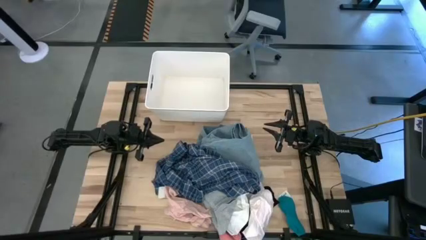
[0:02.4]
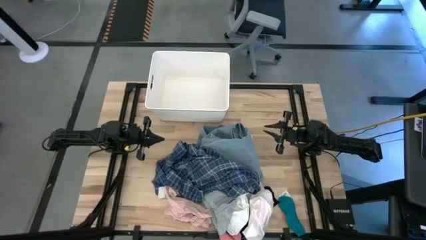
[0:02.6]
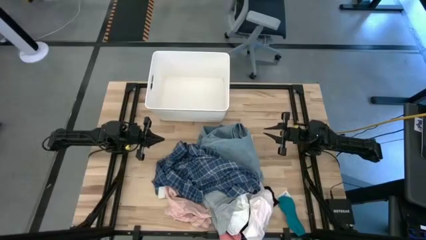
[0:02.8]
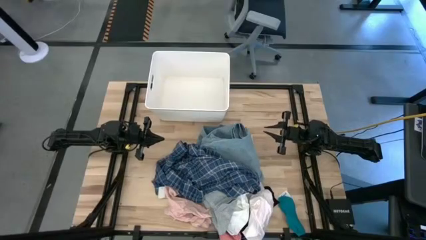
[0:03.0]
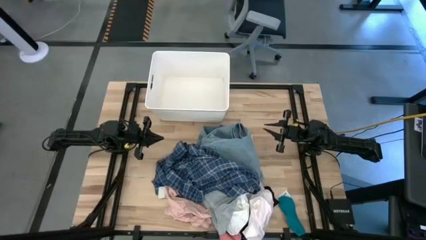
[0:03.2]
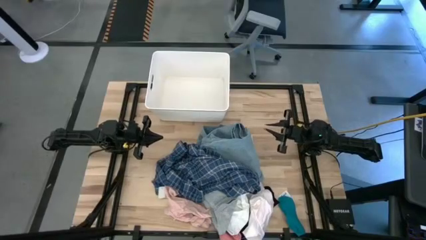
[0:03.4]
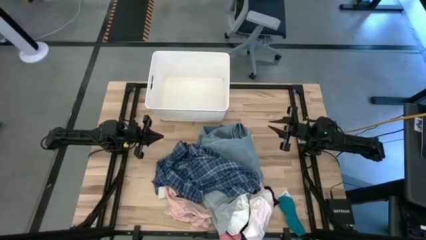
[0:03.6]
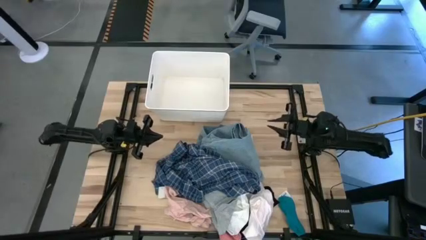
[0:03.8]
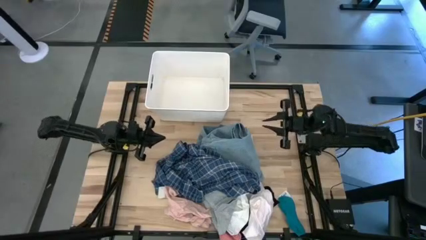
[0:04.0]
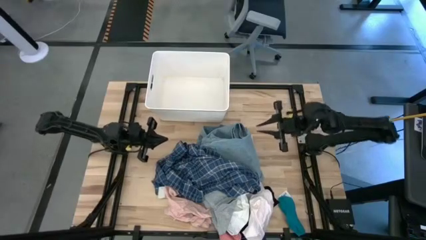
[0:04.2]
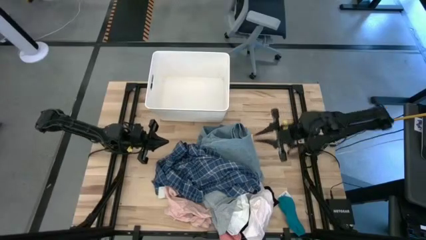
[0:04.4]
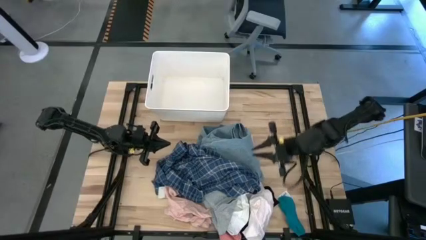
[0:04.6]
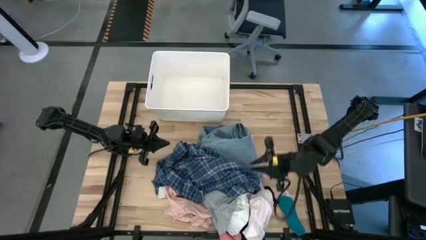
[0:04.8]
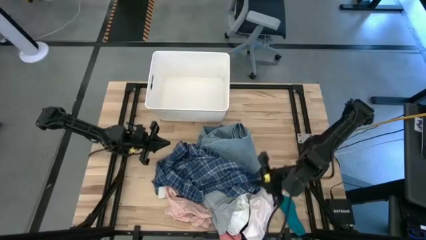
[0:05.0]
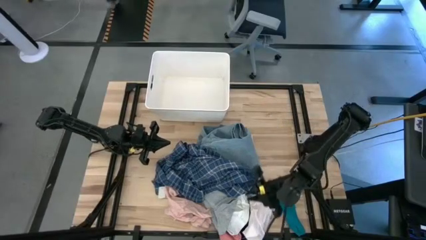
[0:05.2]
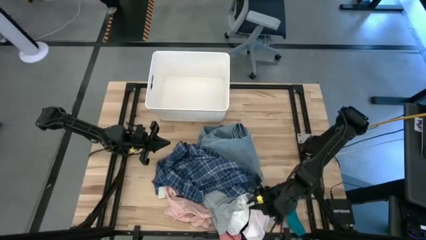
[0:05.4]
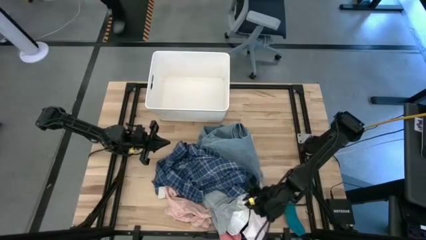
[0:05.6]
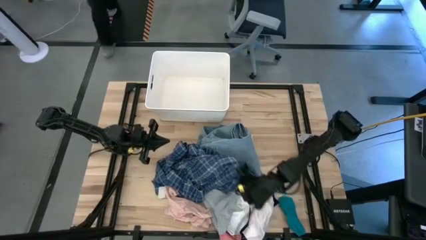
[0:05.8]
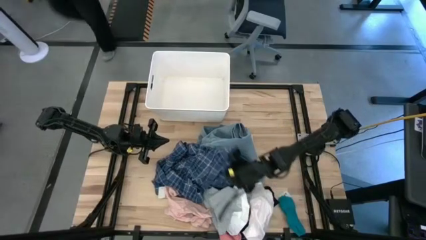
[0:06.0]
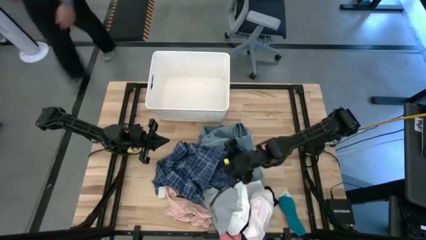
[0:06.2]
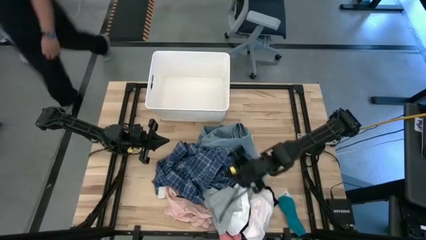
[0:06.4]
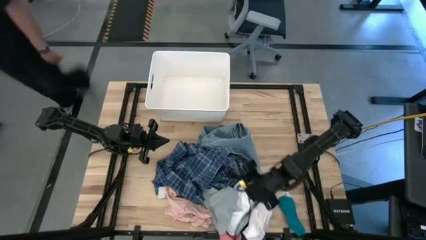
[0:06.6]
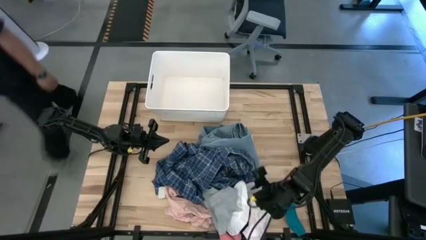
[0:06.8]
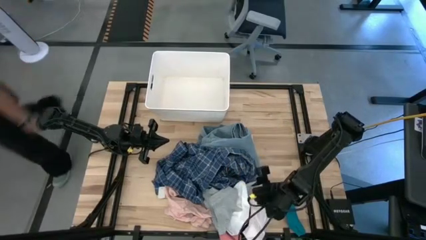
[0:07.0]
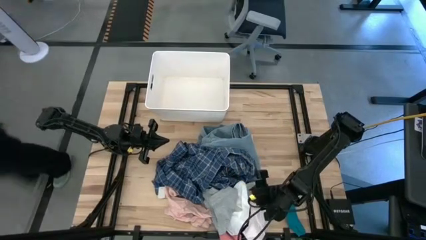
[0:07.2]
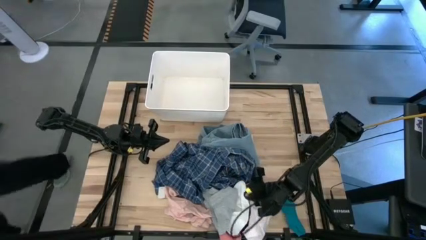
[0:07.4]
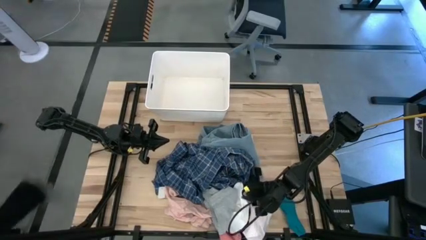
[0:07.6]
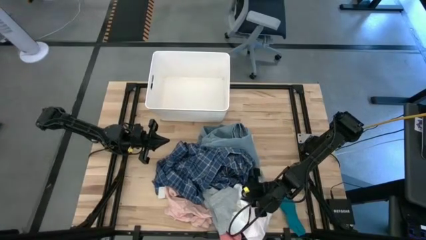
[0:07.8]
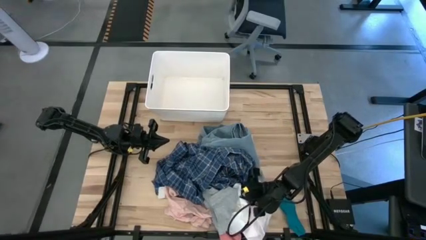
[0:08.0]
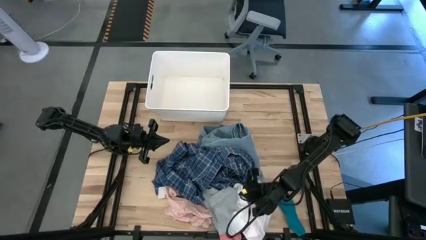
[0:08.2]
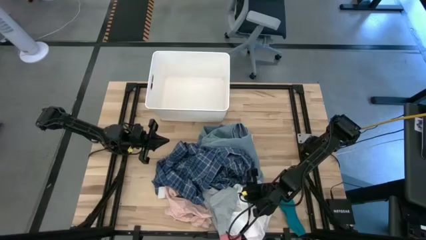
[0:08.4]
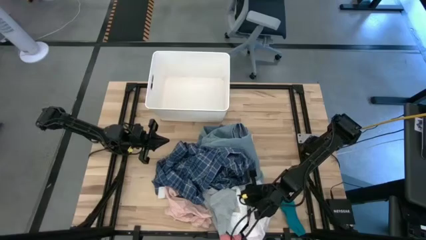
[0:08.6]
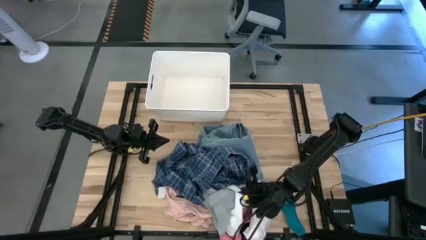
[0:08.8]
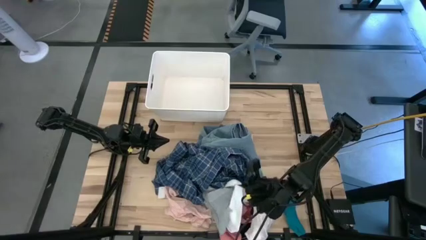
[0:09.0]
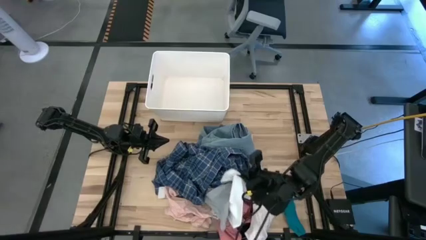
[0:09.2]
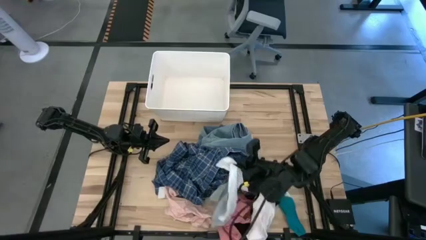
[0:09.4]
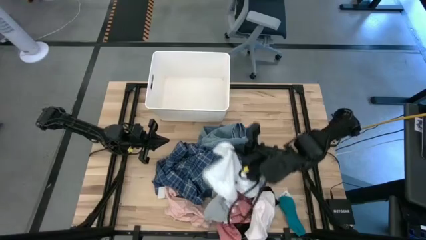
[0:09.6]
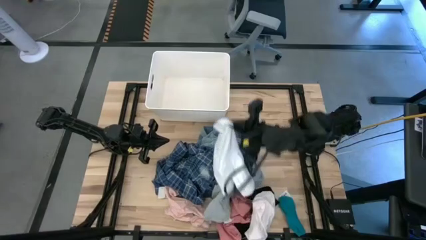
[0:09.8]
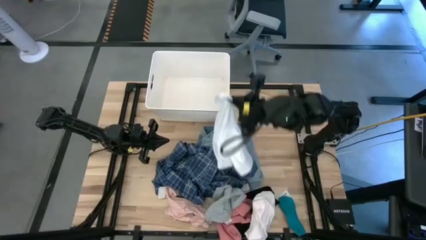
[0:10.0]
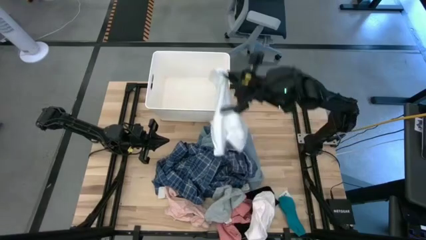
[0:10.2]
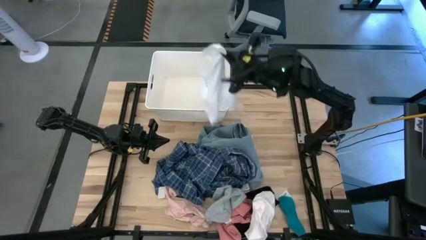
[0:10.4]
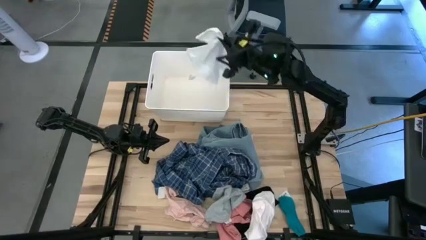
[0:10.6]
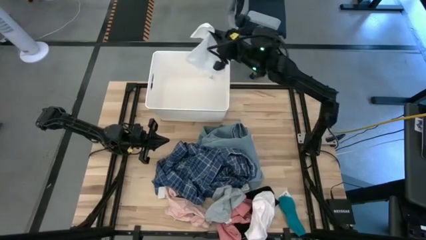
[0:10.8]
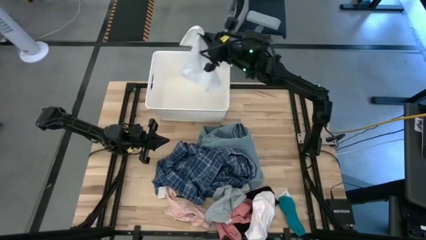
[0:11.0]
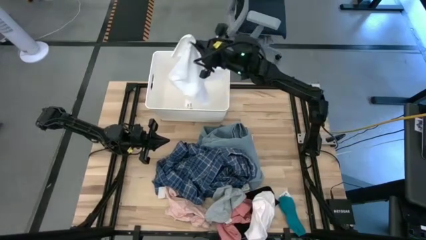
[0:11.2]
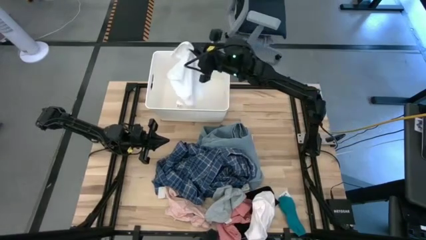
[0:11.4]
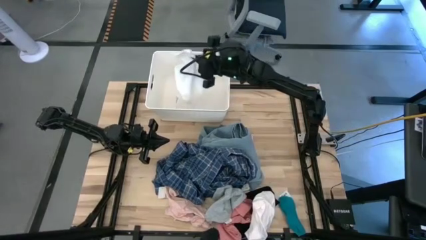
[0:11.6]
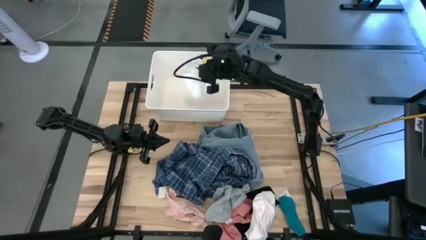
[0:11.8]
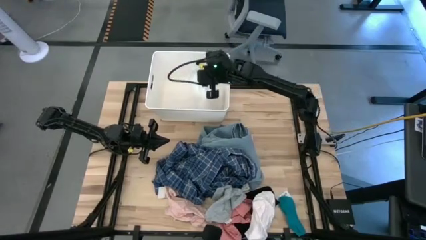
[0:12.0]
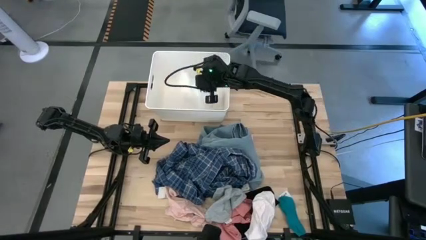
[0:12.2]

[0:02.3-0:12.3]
Task: Sort clothes
Put the white underwear into the white bin

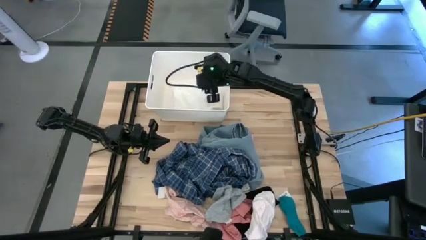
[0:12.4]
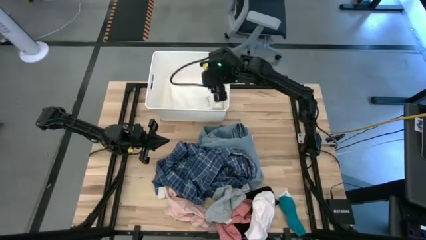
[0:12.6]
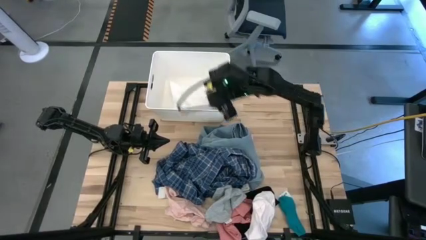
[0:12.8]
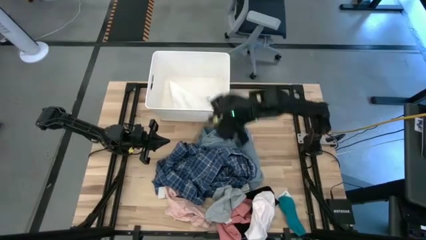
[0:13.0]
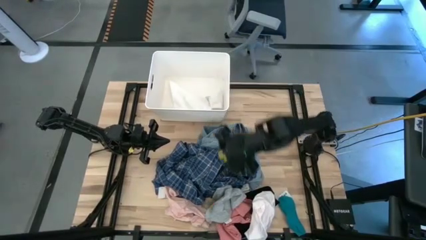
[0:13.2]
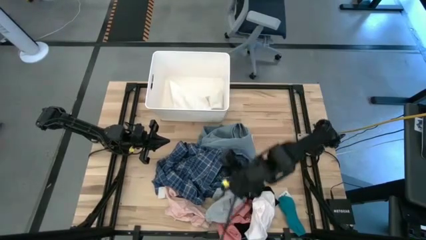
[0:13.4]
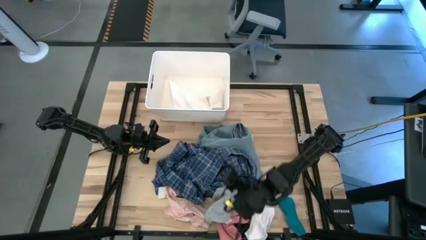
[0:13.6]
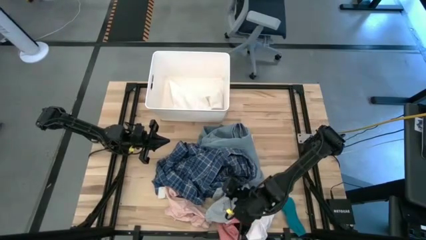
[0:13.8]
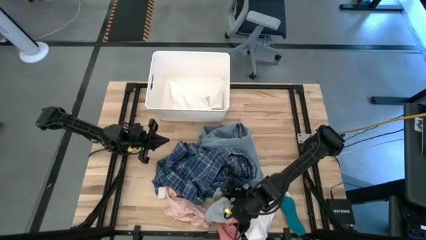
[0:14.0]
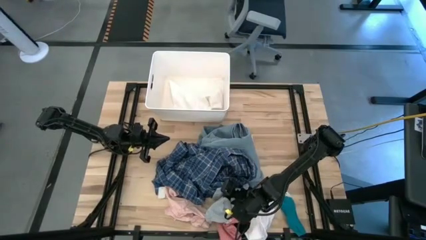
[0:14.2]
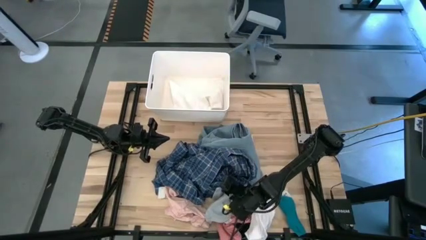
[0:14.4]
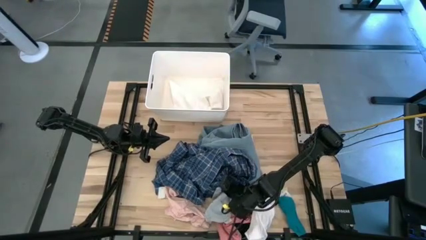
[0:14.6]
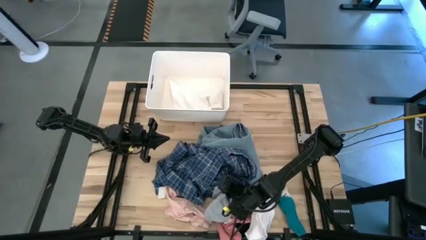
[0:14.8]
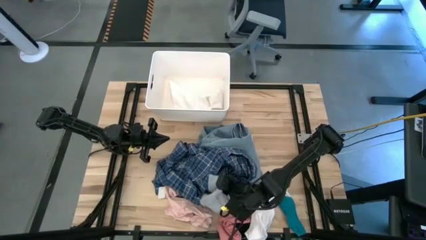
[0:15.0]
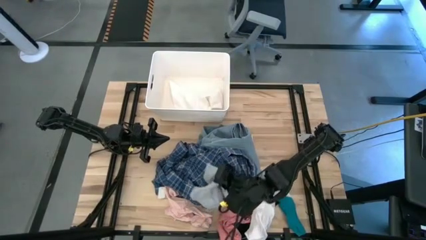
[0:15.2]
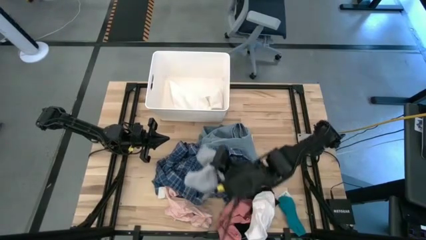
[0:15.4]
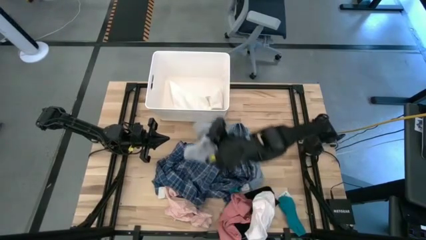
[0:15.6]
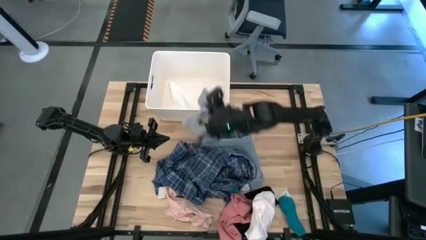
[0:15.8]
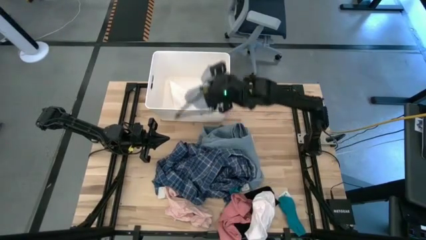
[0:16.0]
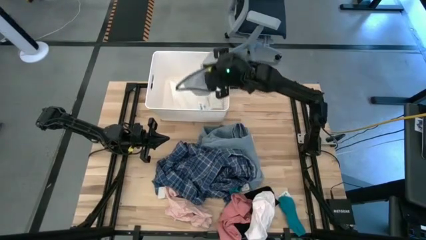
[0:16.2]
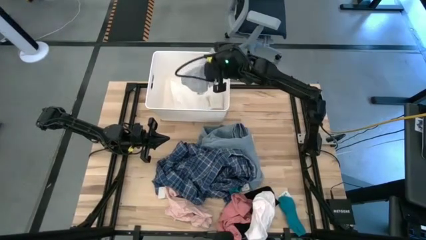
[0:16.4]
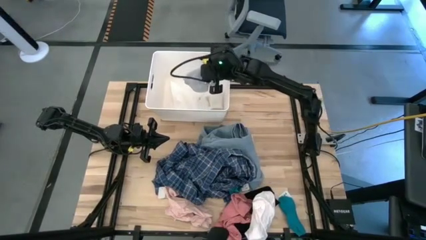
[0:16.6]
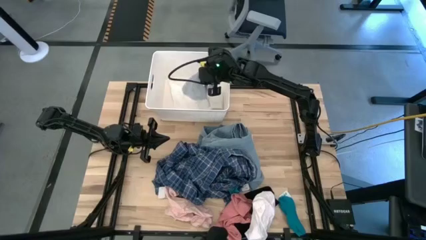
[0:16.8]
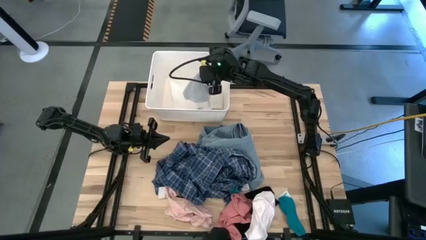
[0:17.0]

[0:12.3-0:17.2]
Put the gray underwear into the white bin
